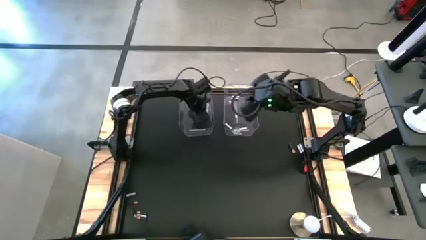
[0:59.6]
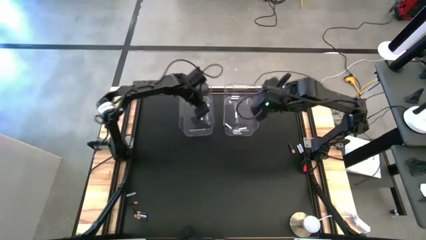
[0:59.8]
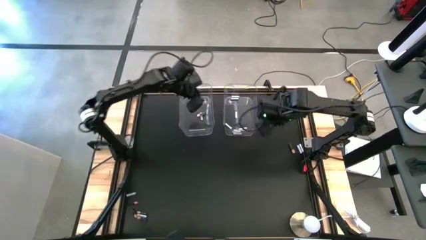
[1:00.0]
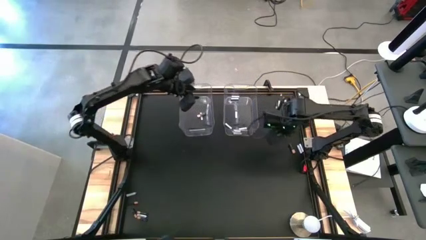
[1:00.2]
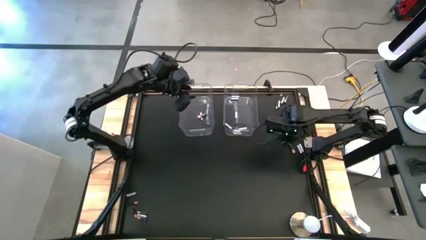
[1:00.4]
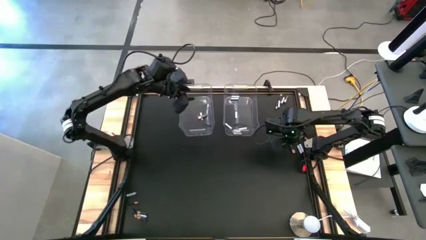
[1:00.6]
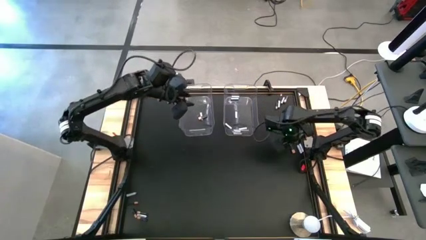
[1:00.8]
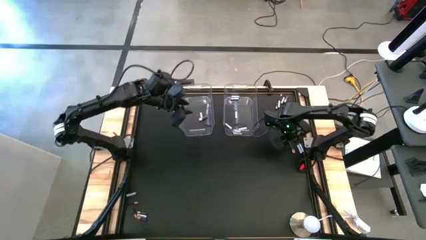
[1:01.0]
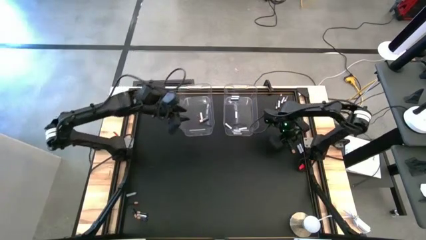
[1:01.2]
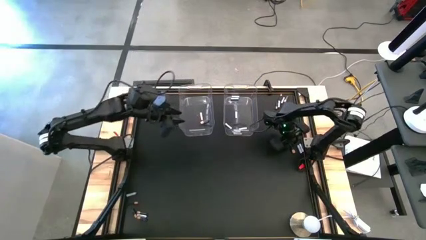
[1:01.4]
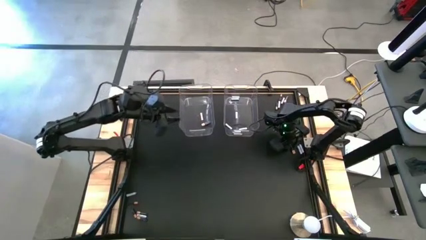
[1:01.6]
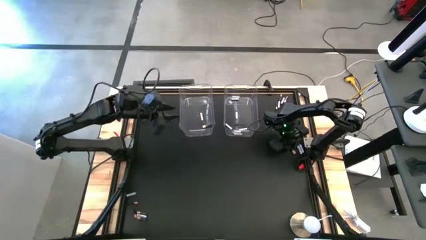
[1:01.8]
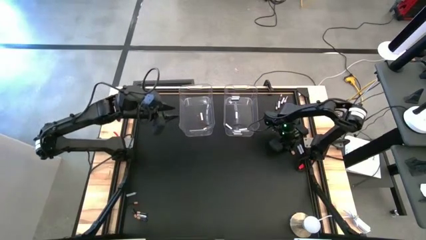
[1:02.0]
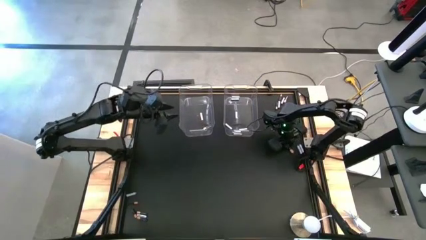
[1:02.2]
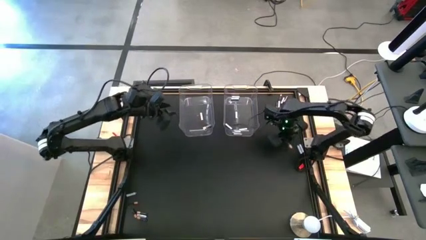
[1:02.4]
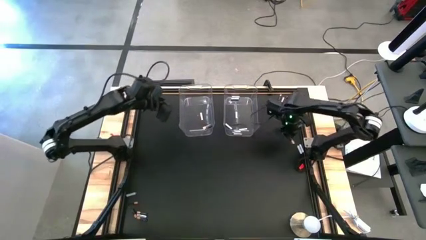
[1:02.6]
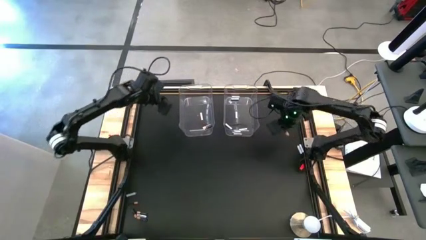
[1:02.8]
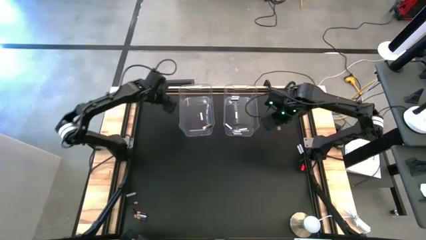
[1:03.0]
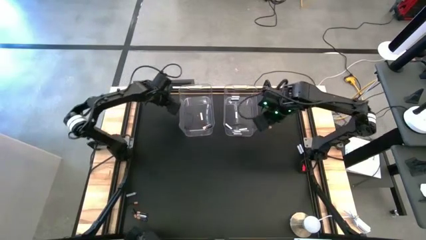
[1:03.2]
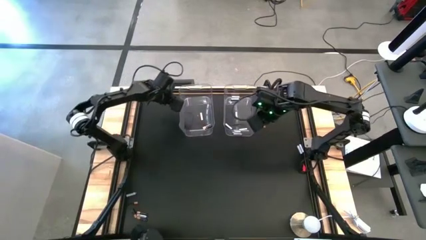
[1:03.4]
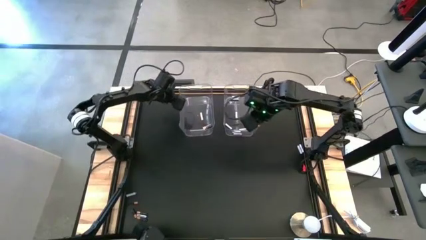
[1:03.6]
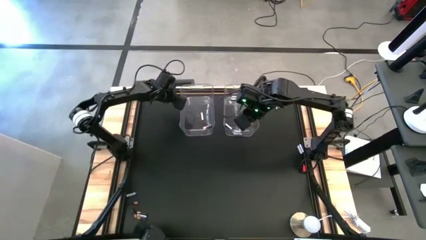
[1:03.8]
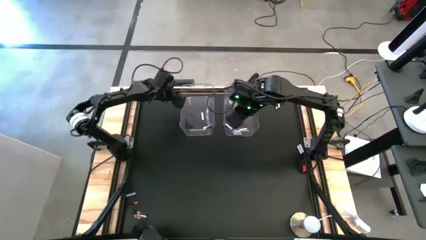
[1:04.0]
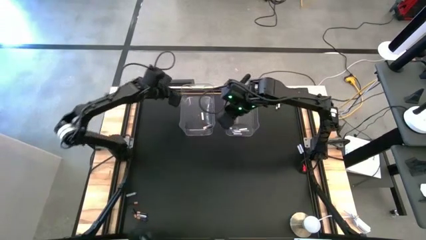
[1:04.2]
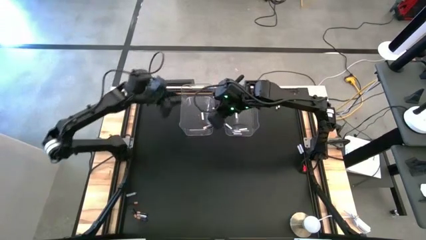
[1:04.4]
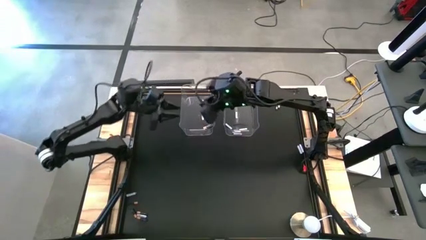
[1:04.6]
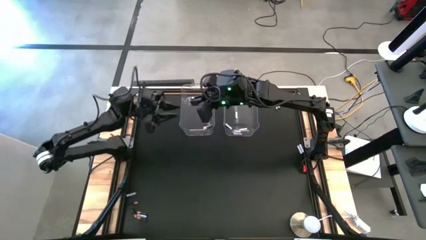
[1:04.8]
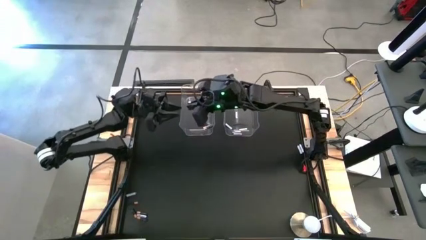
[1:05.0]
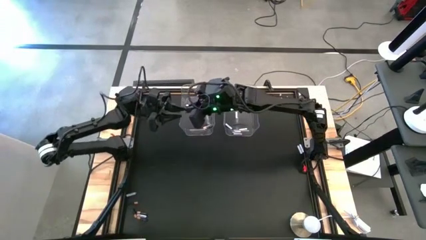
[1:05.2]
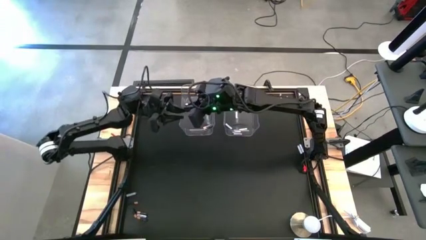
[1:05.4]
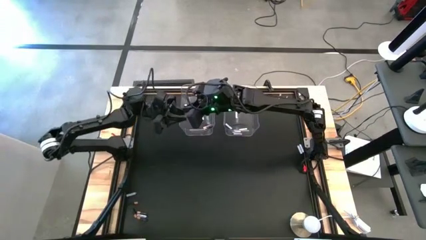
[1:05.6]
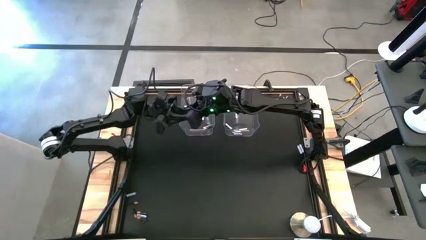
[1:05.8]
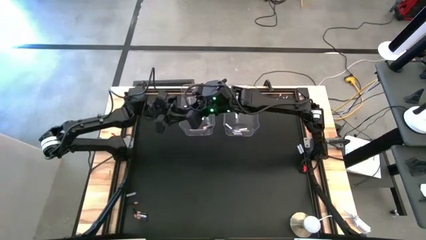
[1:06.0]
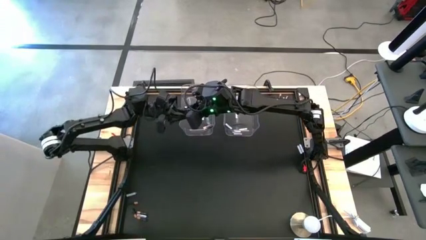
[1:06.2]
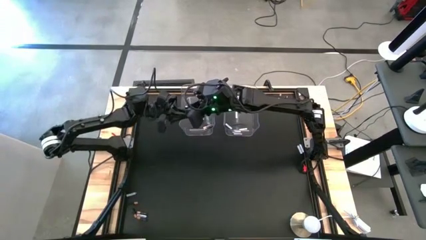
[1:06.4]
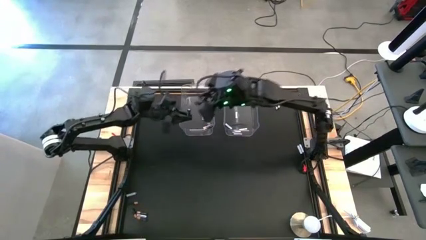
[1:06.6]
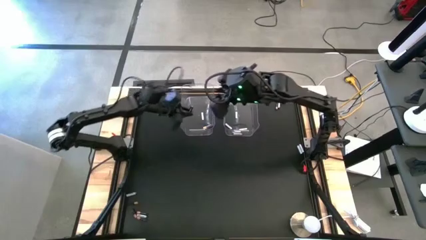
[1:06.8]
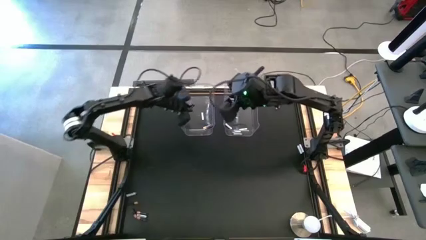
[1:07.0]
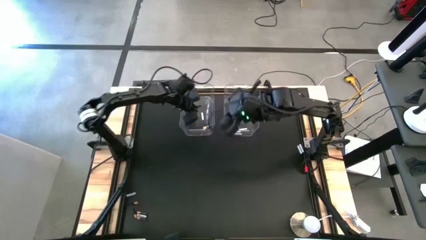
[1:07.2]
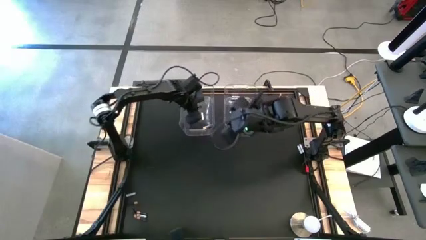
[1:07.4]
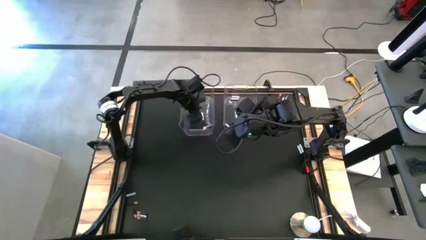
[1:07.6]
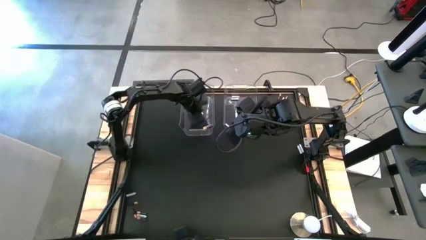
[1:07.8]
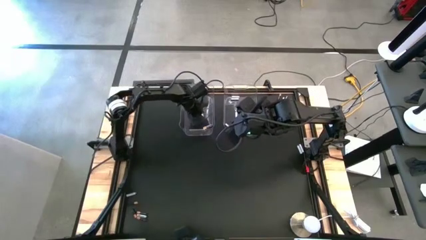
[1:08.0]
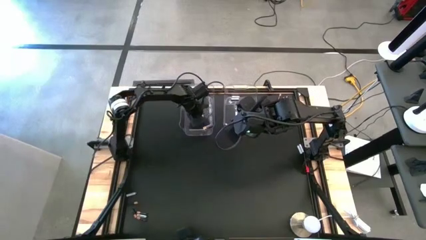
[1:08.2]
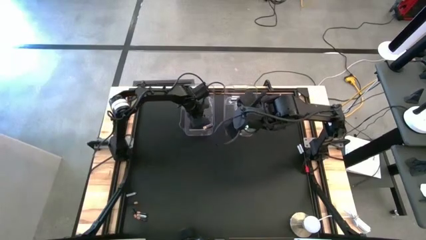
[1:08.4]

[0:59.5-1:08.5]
Task: Sort batteries
Put the black battery into the left transparent bin

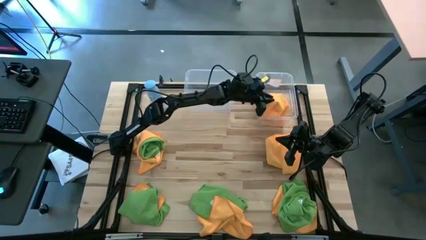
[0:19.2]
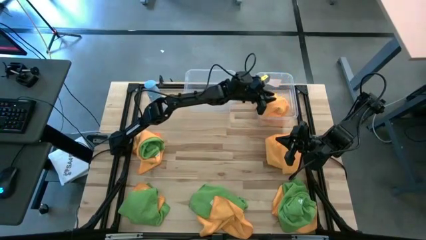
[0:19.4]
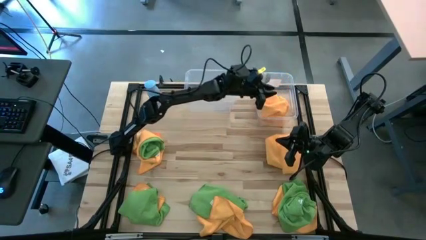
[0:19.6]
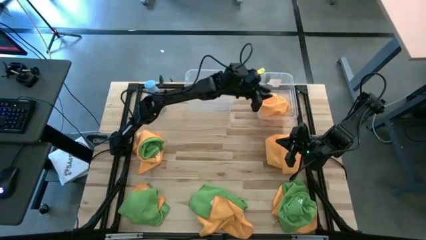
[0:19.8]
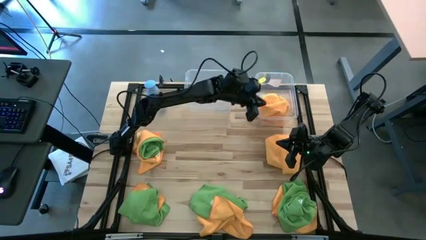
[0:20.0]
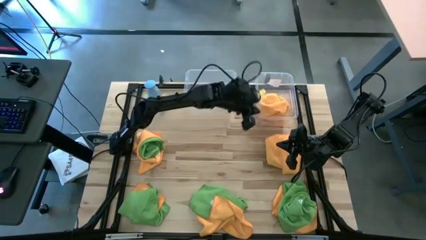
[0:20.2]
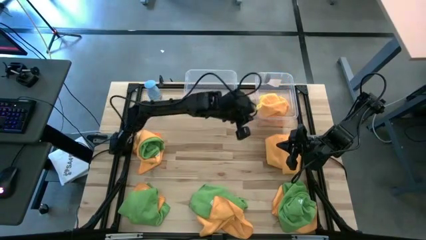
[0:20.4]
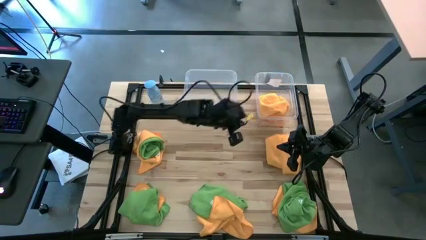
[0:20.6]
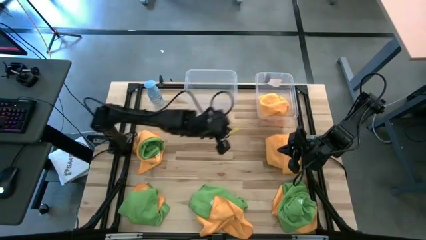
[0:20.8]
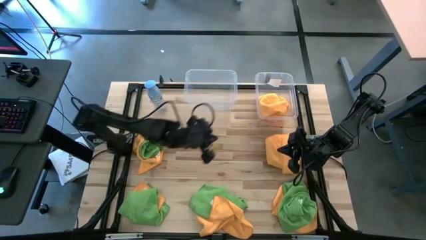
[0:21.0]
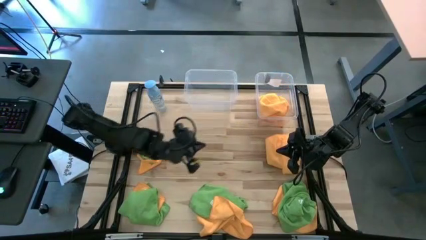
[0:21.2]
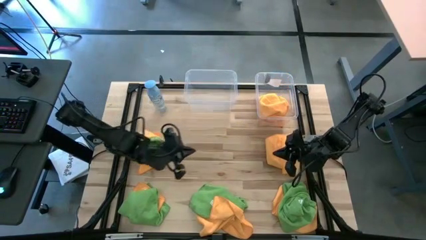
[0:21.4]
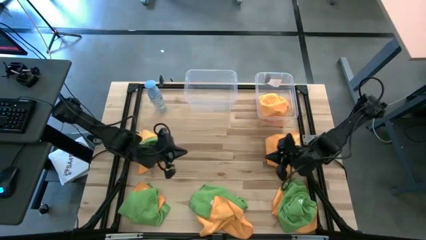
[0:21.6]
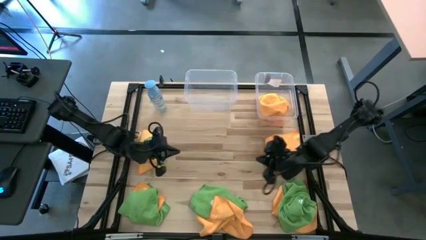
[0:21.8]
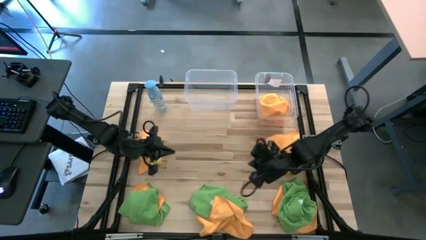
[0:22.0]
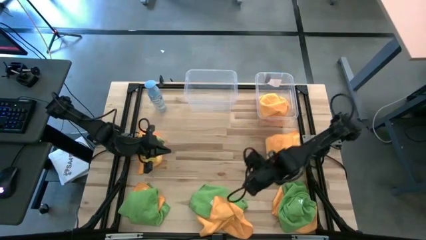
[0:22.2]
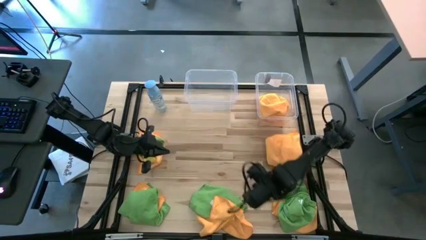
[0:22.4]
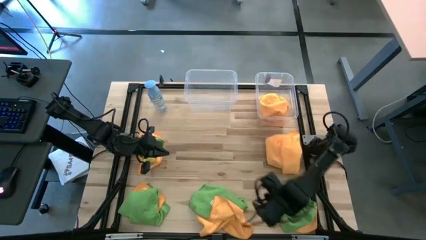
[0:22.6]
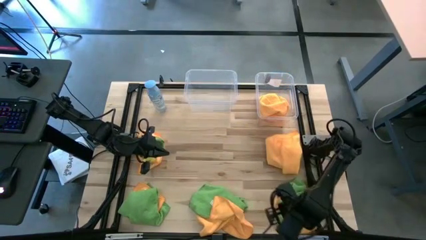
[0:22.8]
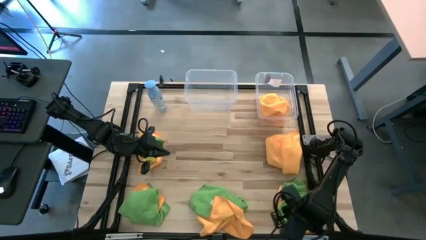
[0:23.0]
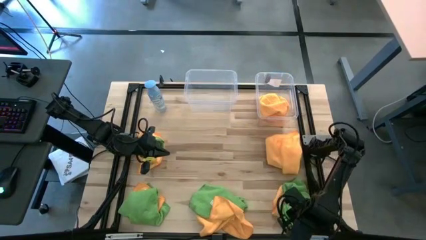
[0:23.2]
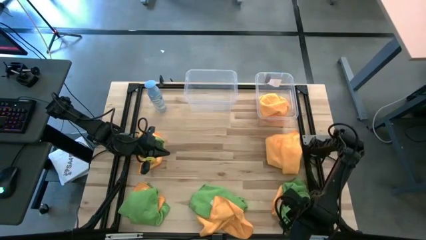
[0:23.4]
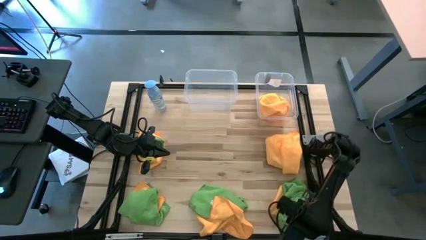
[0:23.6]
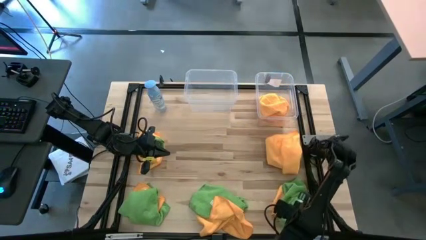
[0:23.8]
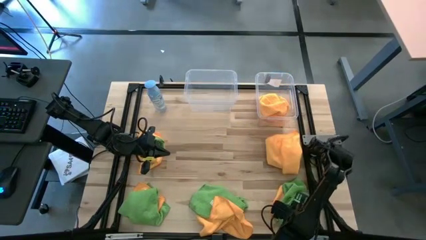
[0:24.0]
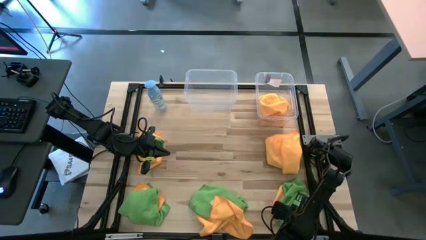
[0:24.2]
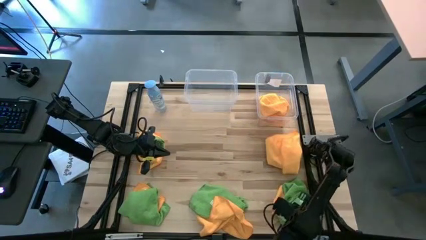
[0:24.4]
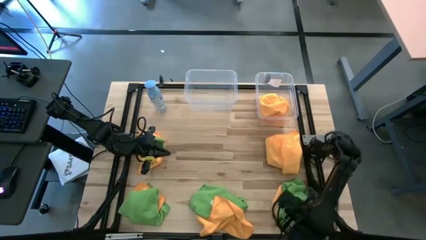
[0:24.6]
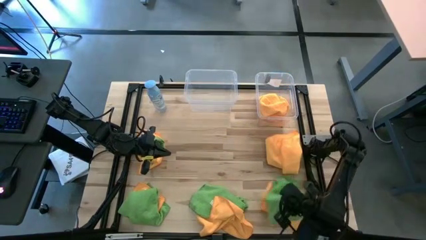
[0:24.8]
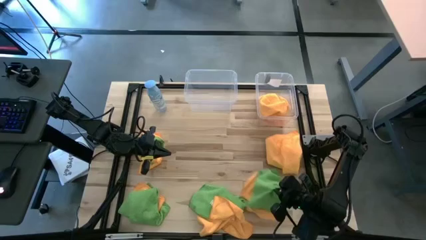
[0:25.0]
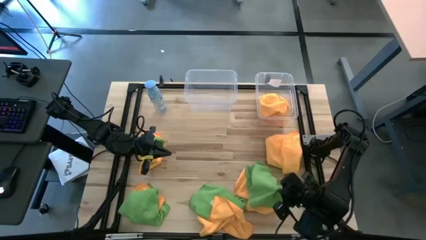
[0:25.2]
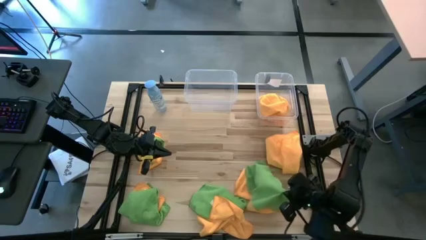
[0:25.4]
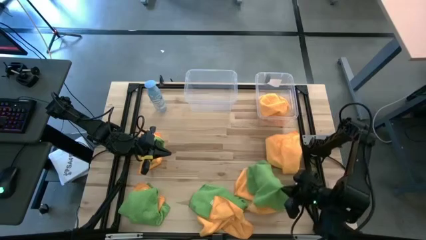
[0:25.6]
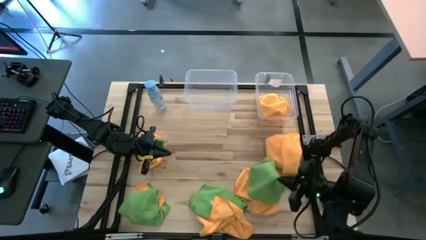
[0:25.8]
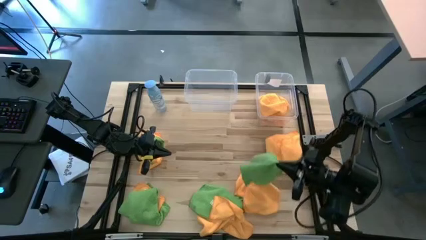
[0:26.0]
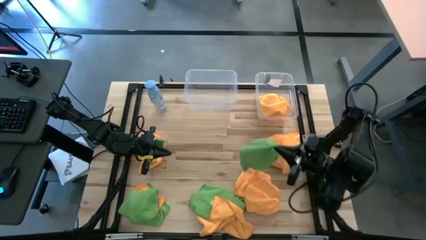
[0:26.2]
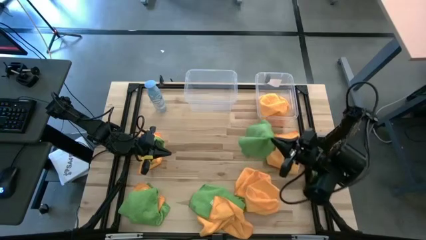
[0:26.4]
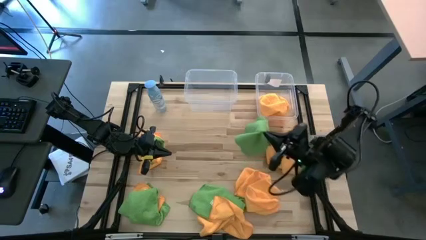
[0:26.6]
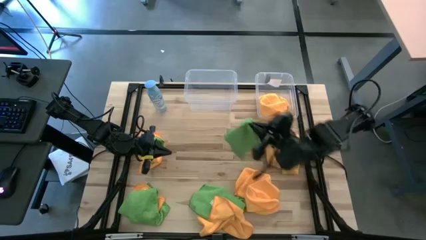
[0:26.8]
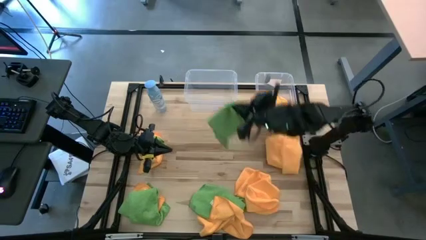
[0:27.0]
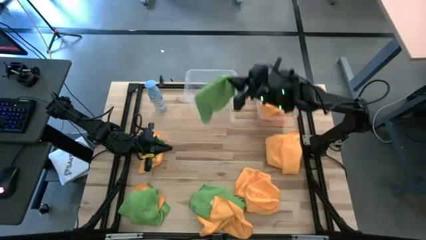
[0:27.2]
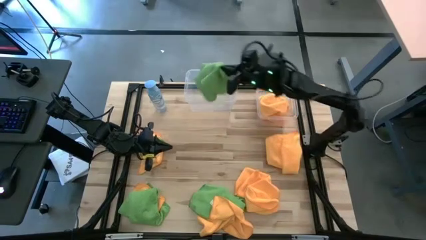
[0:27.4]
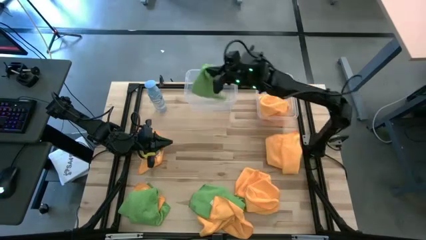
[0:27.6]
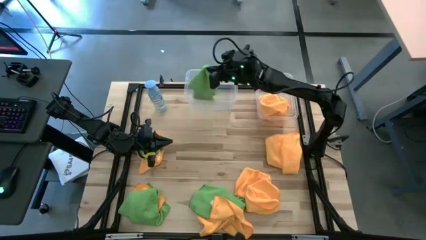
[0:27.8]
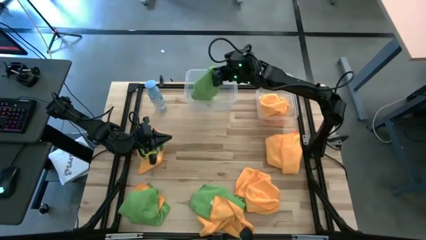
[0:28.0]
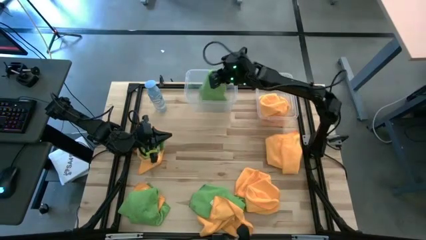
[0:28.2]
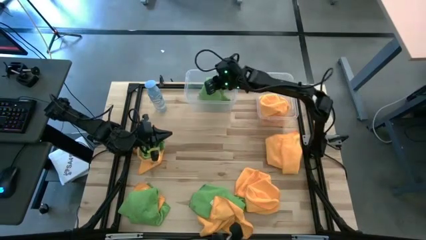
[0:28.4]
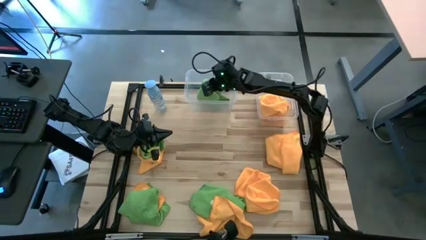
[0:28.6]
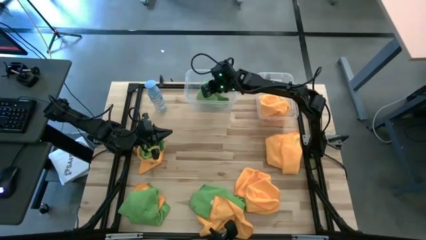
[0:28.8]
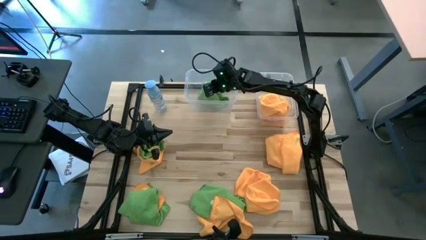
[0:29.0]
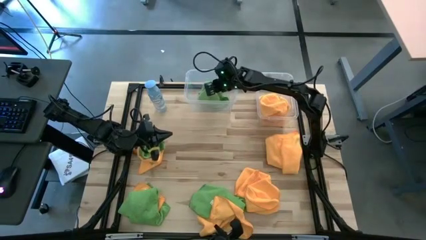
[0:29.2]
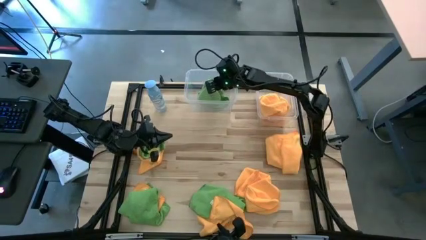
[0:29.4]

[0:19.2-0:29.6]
Task: Sort microfiber towel by color & place in baskets
Put the green towel into the left transparent bin
